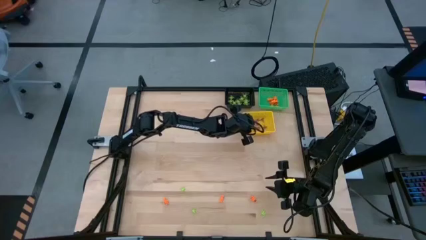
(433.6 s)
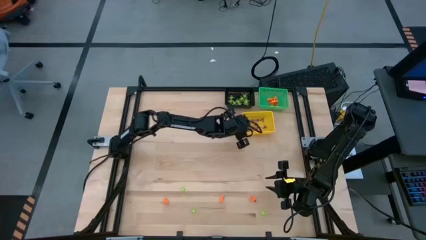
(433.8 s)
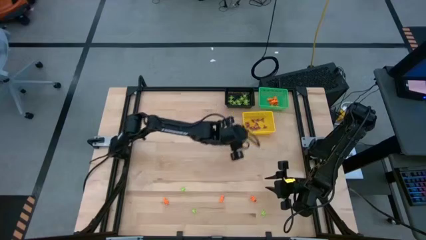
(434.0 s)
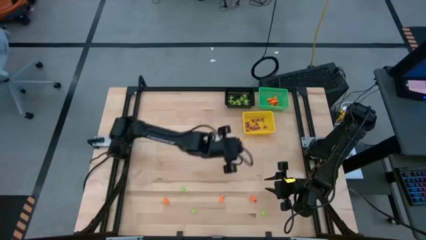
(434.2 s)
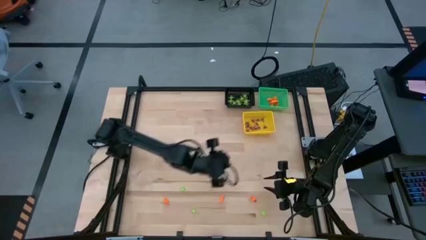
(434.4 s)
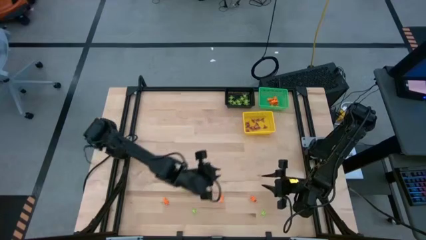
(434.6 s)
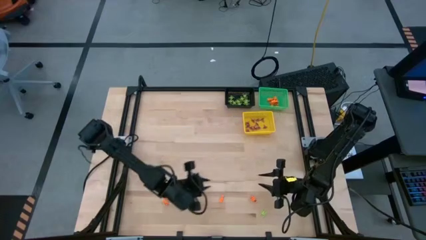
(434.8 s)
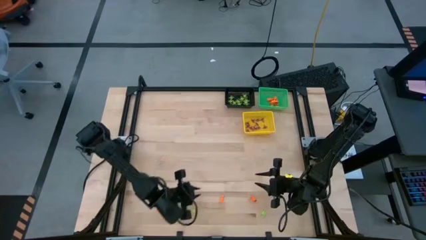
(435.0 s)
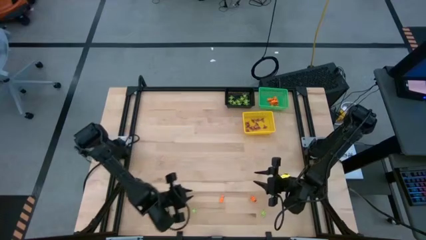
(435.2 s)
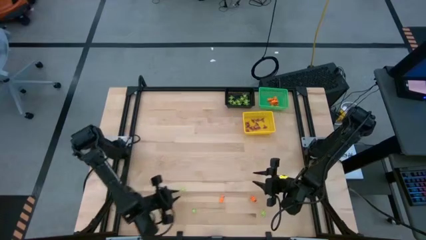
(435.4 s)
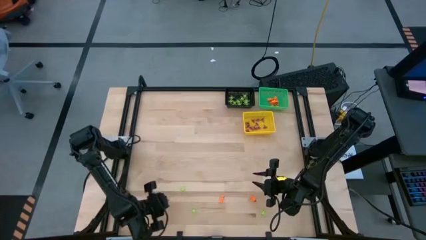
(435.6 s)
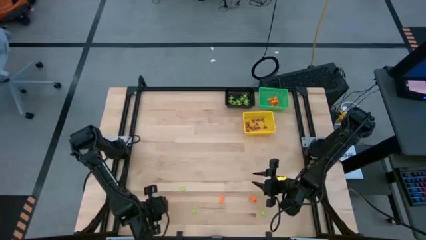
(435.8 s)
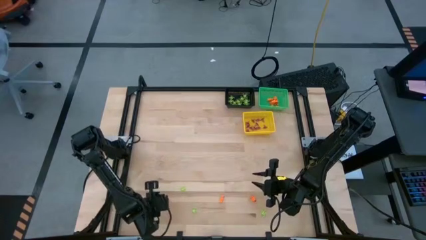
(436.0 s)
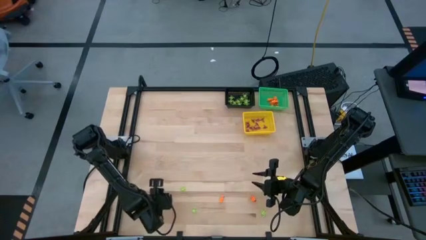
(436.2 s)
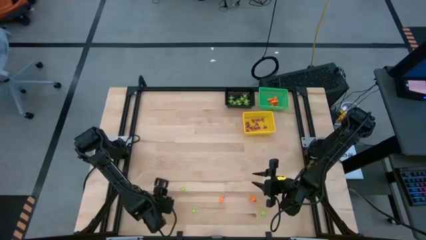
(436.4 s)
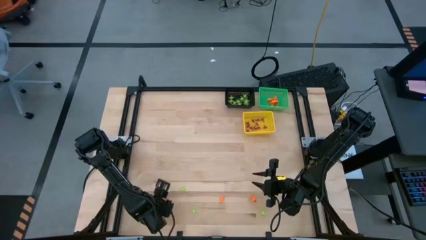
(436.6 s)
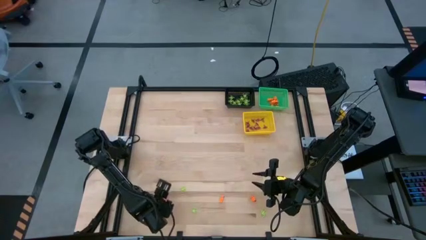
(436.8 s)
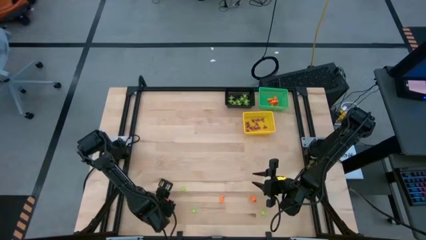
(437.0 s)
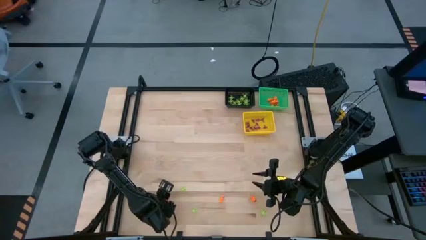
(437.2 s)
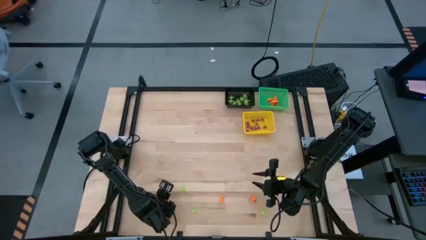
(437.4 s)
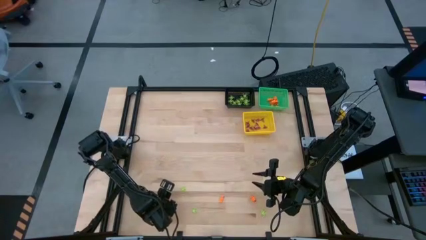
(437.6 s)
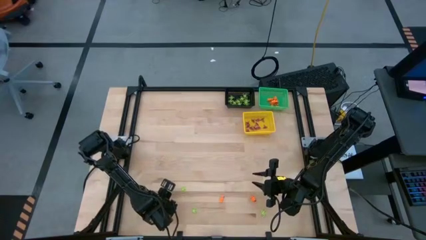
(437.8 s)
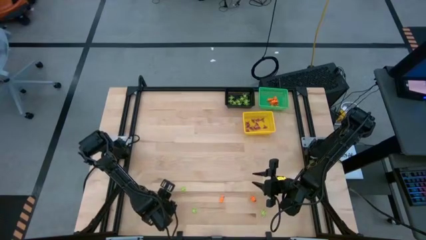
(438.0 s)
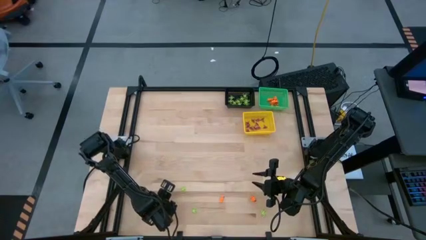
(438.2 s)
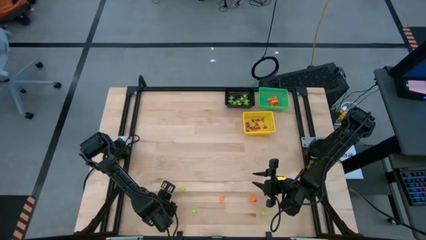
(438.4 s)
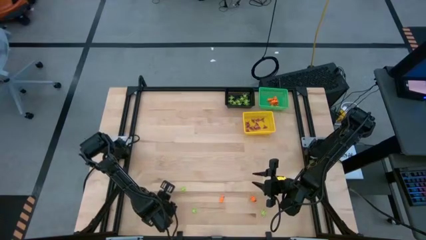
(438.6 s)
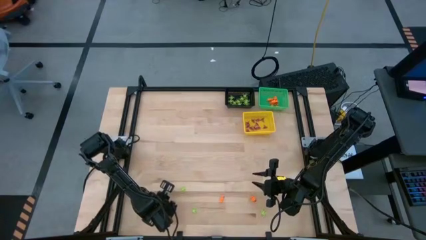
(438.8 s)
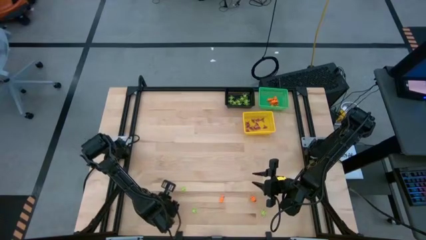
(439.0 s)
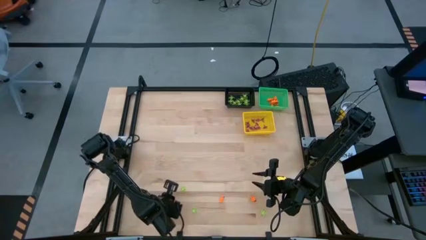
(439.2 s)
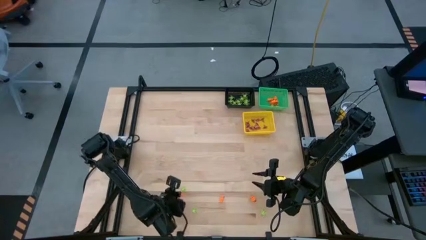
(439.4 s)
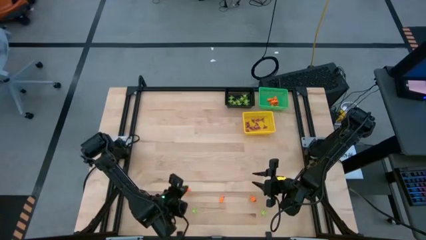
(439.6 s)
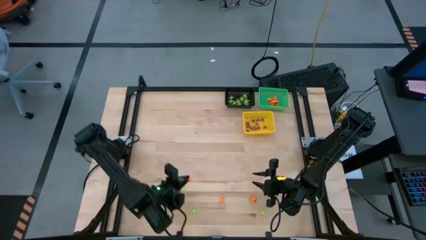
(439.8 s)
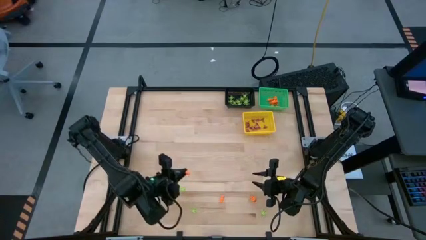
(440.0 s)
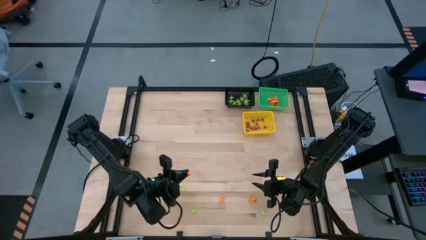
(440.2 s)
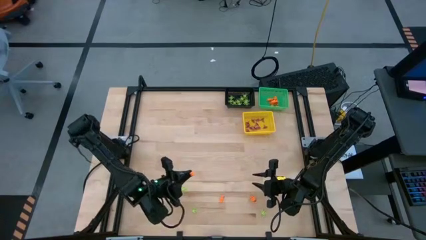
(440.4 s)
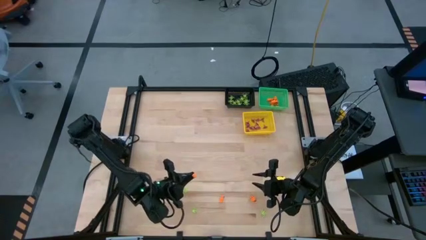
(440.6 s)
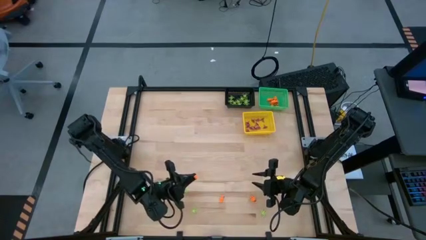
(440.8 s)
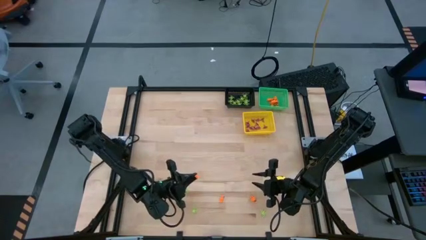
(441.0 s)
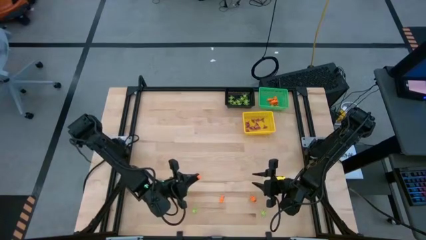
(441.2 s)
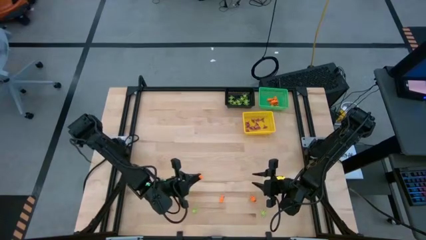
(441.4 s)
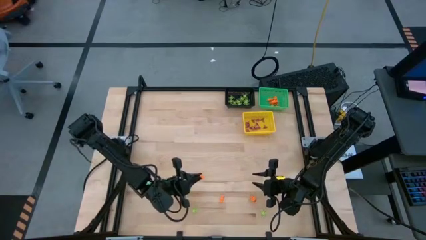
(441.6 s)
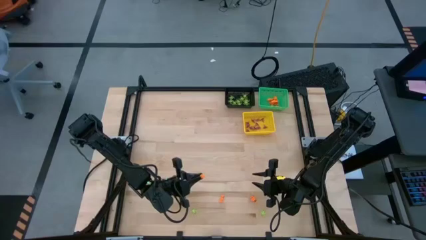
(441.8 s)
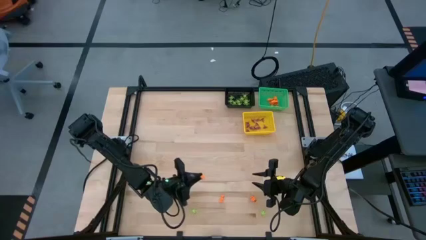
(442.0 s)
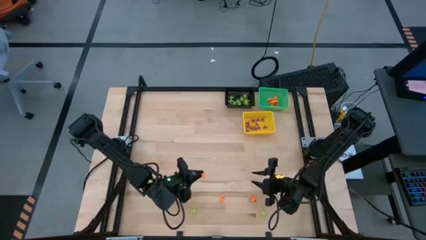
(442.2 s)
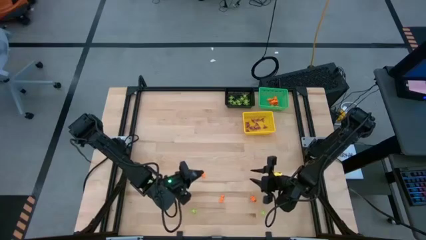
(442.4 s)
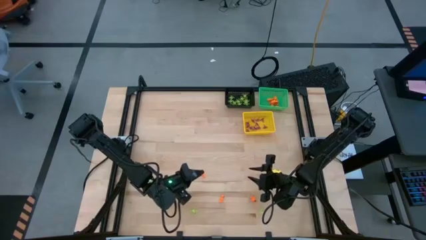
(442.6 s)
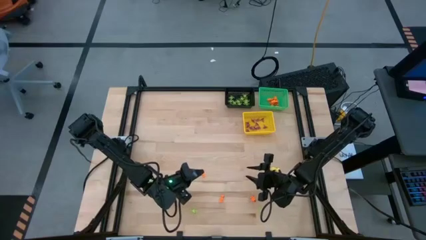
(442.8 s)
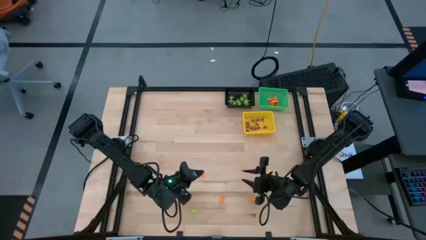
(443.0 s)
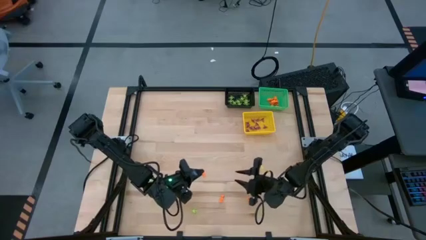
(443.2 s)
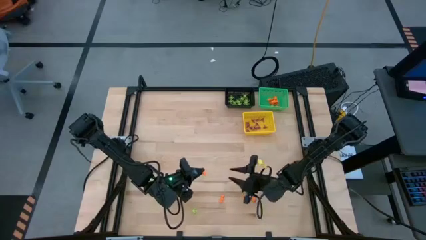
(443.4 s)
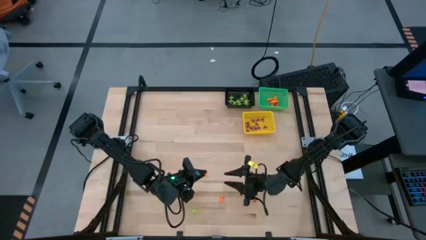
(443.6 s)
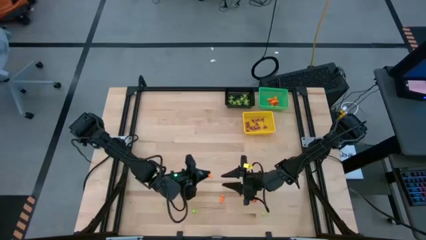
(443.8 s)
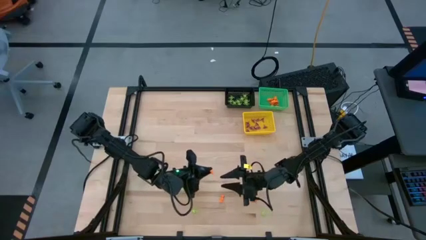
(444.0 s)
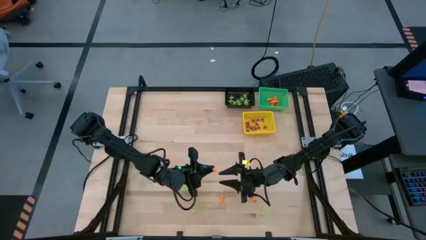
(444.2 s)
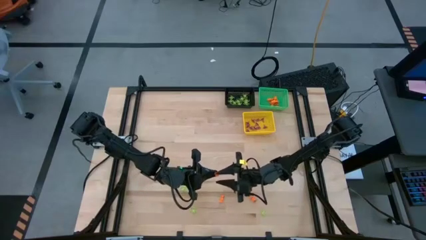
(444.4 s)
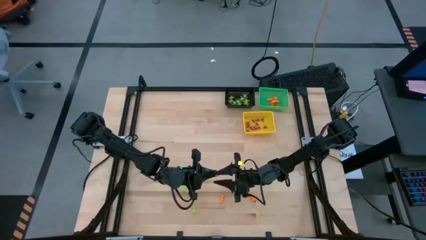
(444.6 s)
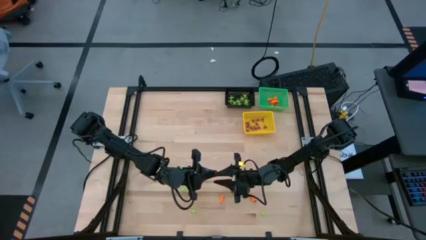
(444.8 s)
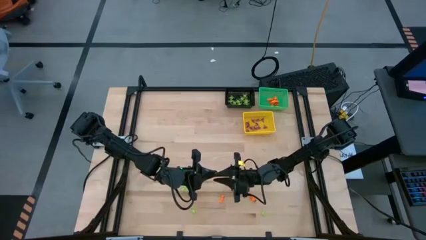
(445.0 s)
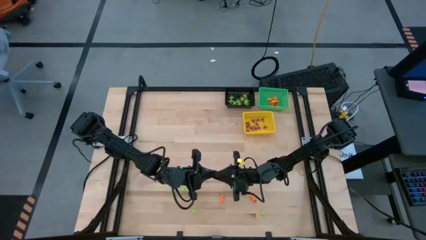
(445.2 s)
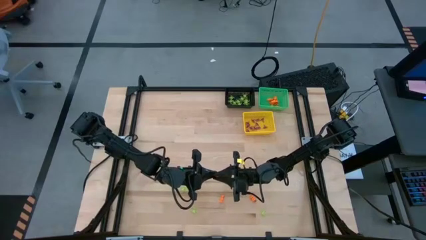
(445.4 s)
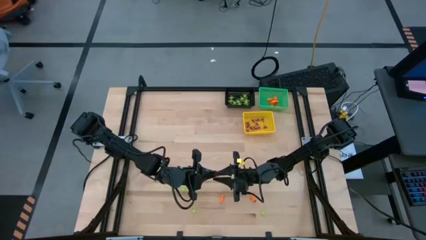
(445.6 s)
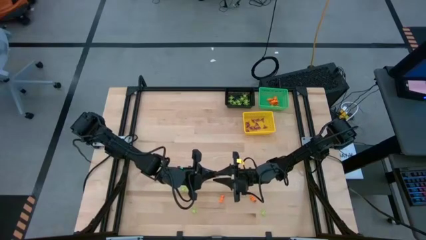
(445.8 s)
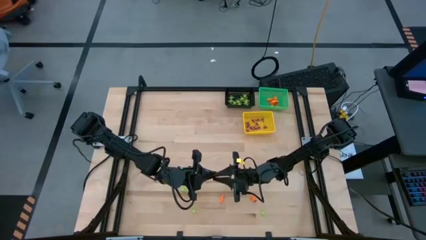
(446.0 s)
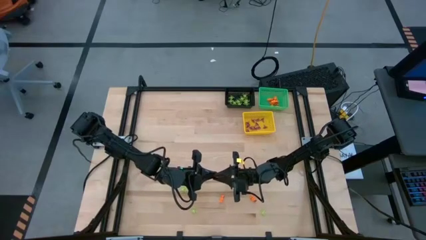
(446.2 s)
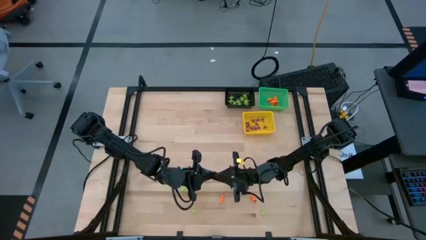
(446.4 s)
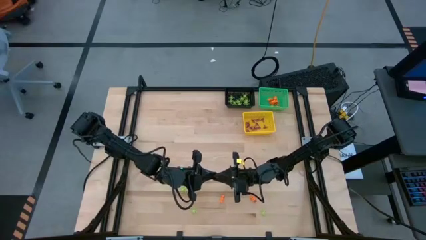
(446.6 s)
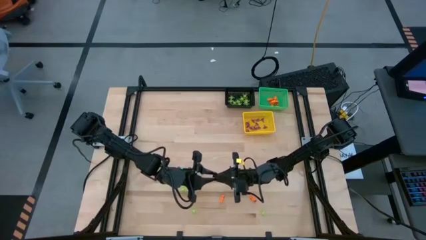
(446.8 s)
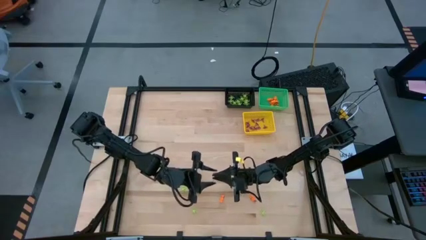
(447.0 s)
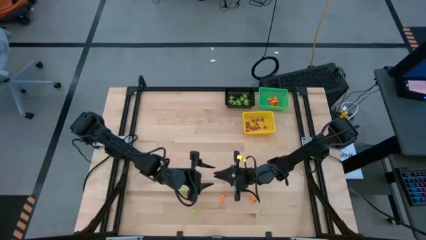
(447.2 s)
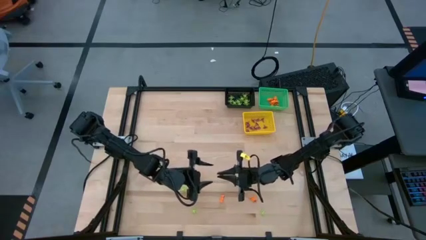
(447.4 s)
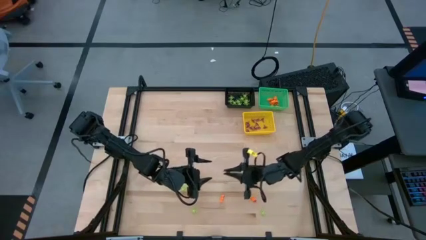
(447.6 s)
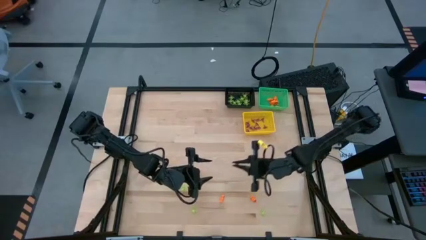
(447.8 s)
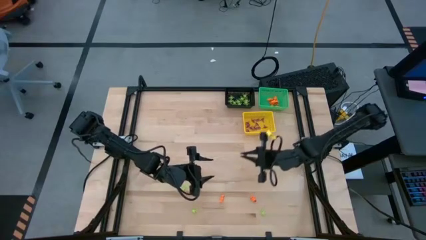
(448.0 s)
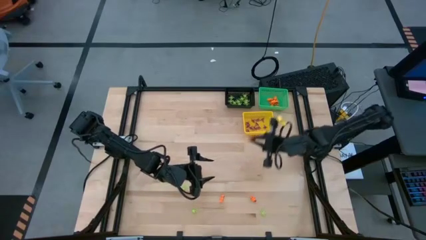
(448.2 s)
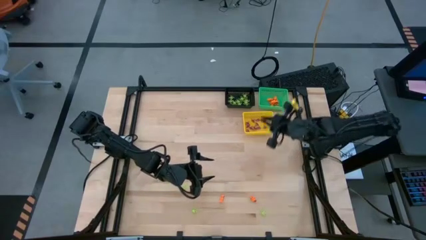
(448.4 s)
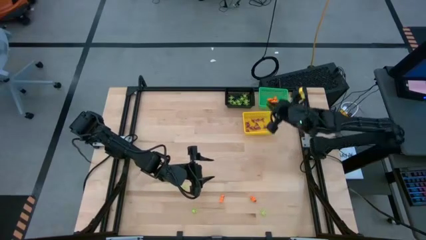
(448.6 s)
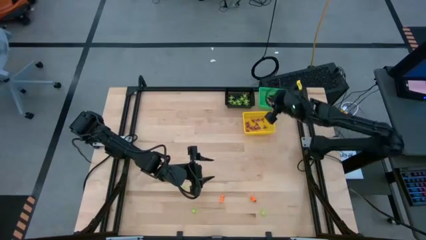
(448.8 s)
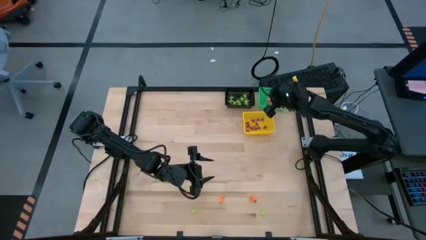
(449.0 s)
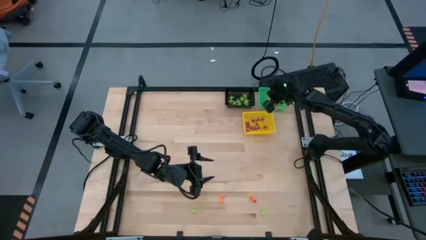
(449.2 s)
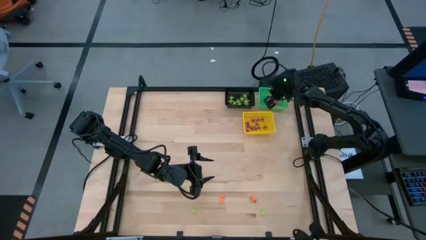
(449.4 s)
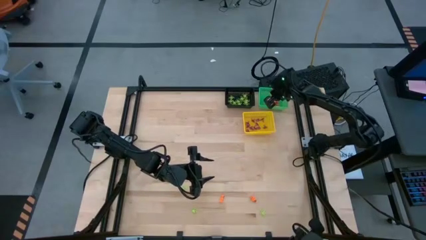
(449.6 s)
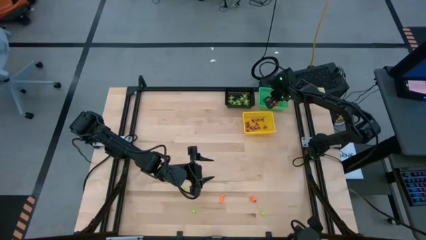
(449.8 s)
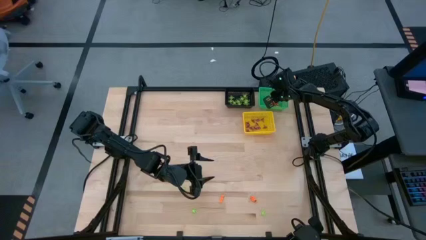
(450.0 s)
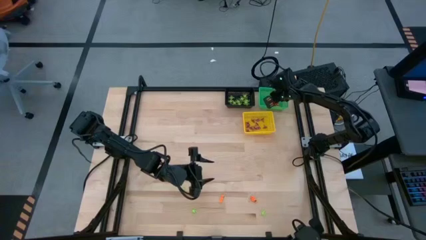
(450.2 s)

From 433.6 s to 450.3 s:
Task: Sort Halloween decoration
Put the orange skeleton toy into the green basket

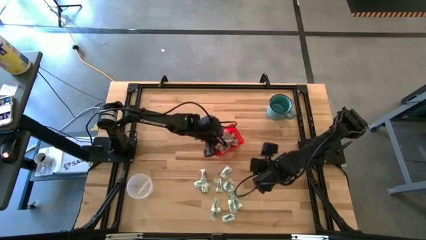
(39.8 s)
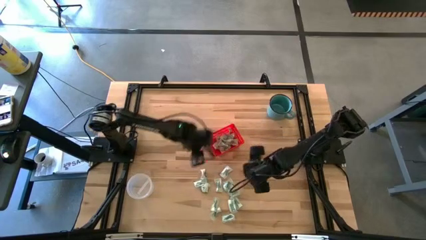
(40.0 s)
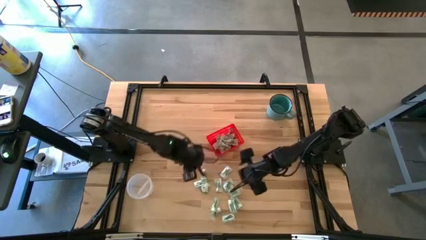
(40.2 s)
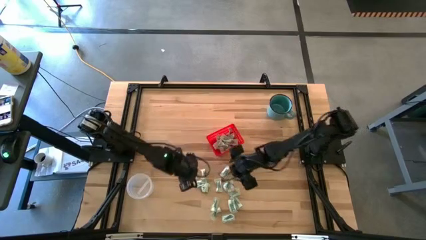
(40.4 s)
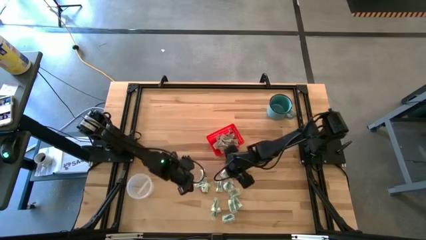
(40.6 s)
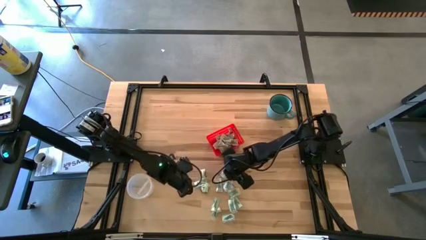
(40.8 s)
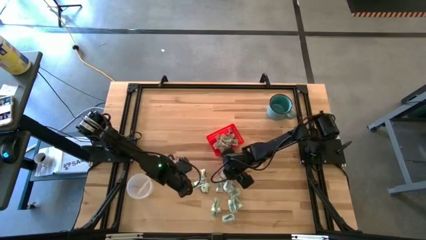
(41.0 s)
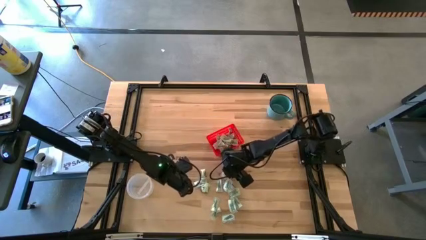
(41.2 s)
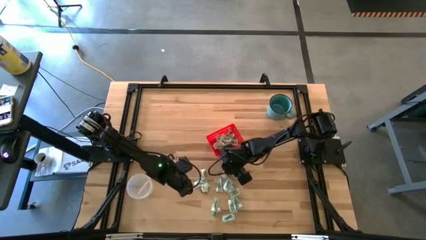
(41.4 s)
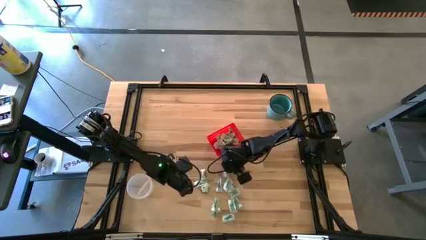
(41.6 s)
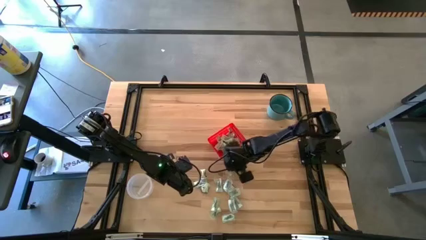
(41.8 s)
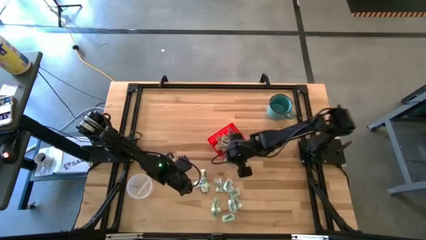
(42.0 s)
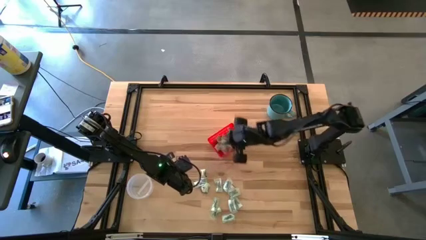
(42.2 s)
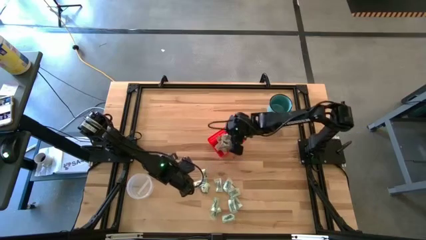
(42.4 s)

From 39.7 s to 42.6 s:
Task: Pick and place items into bin
Put the stevia packet into the red bin
